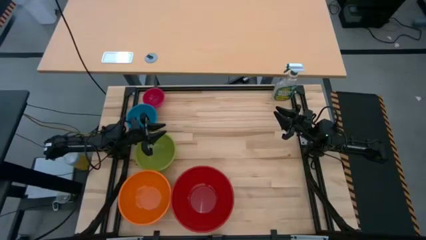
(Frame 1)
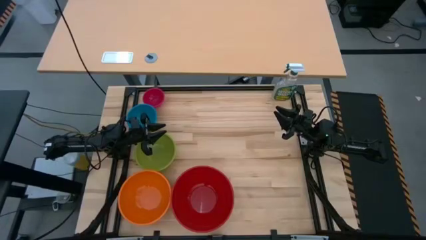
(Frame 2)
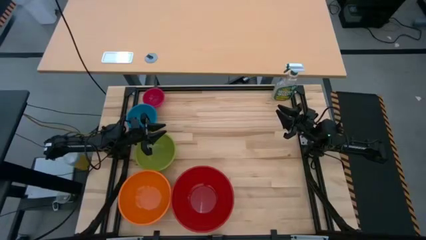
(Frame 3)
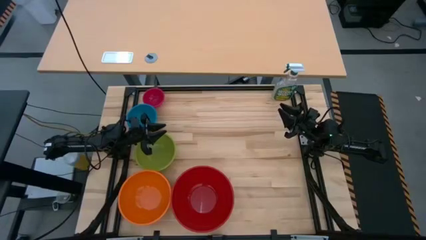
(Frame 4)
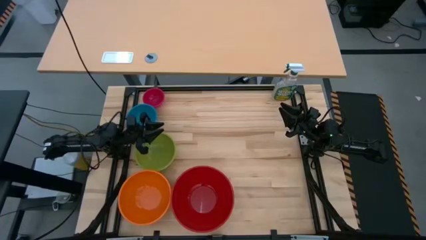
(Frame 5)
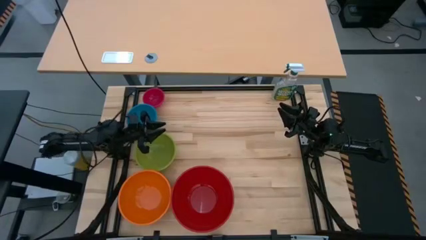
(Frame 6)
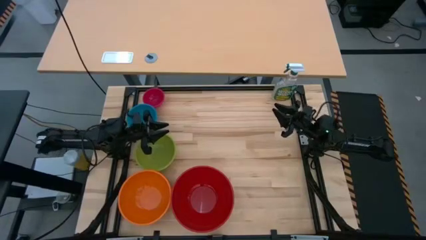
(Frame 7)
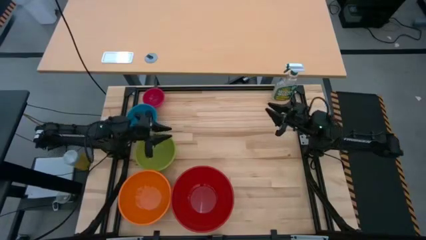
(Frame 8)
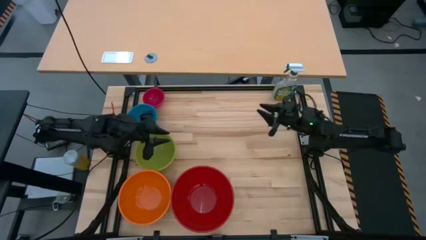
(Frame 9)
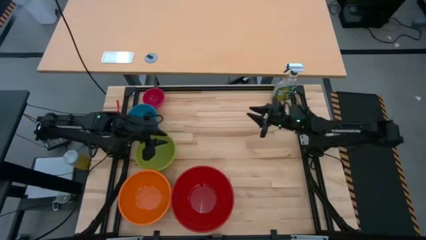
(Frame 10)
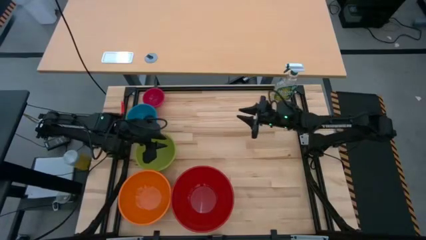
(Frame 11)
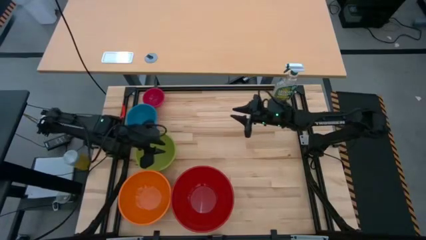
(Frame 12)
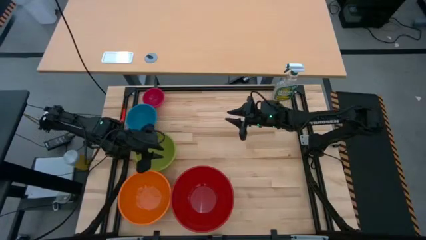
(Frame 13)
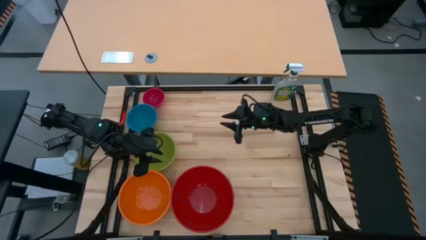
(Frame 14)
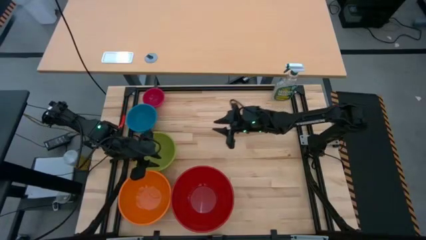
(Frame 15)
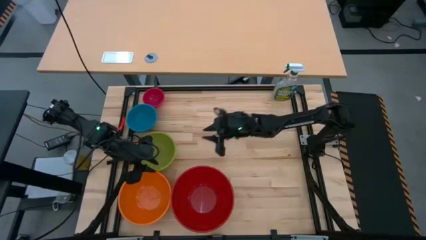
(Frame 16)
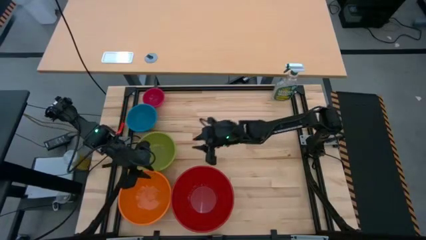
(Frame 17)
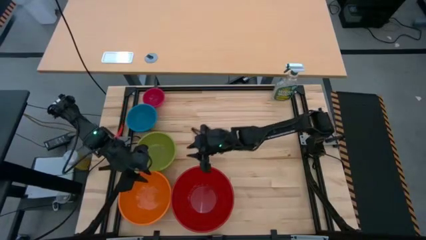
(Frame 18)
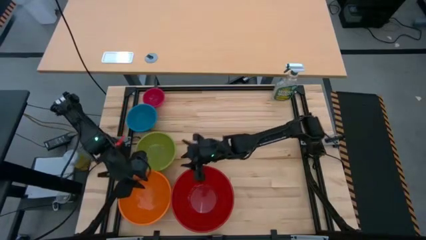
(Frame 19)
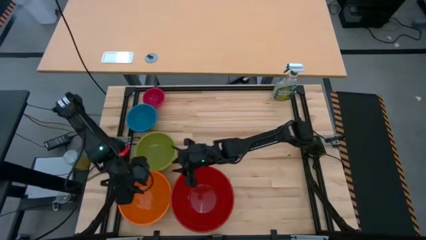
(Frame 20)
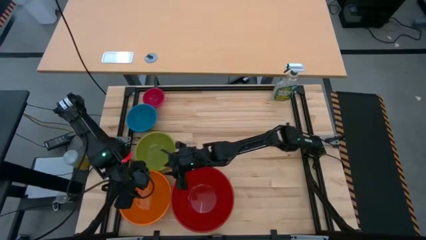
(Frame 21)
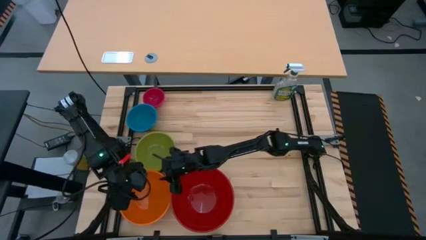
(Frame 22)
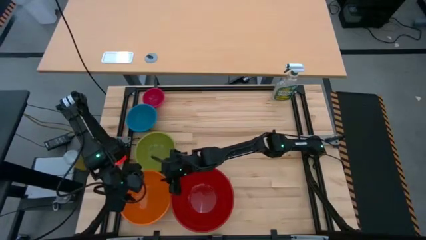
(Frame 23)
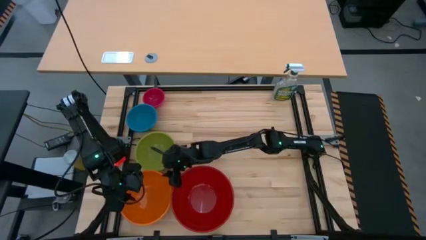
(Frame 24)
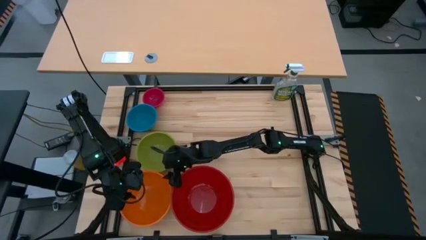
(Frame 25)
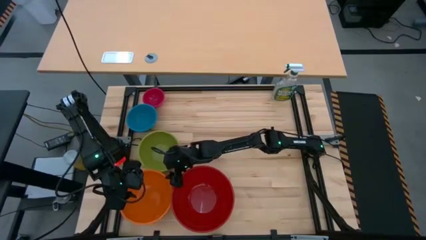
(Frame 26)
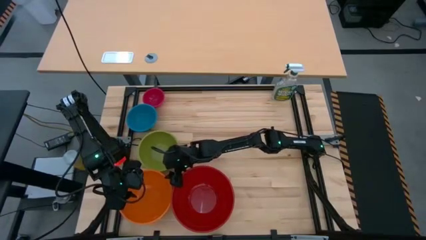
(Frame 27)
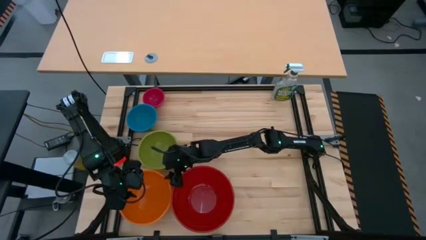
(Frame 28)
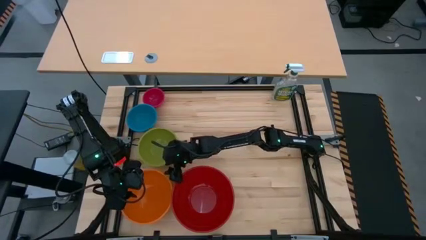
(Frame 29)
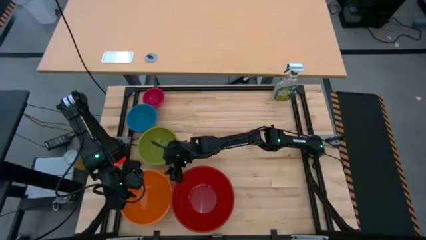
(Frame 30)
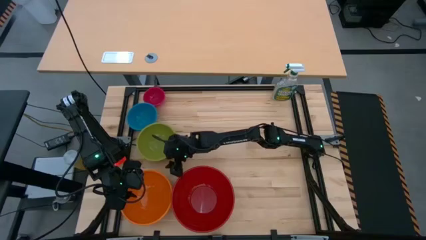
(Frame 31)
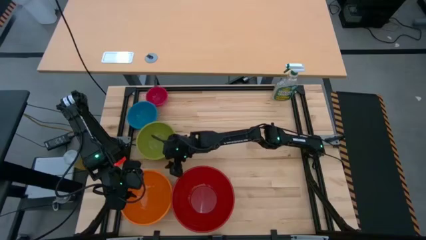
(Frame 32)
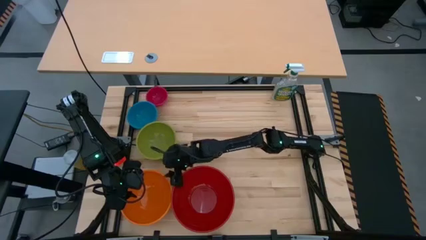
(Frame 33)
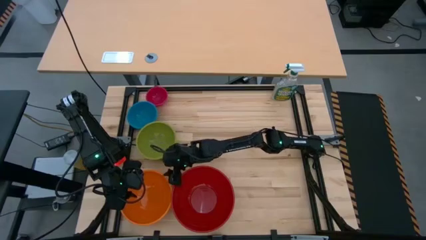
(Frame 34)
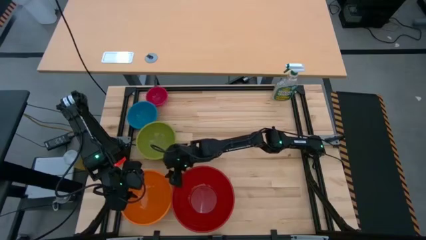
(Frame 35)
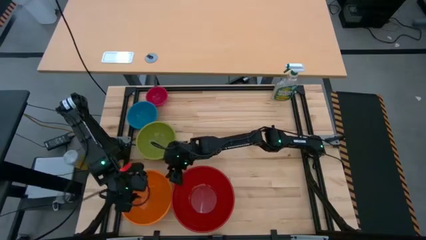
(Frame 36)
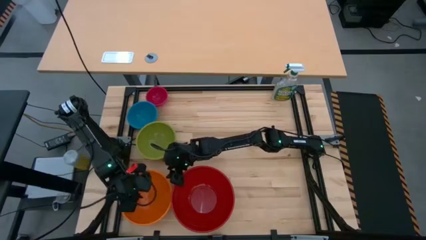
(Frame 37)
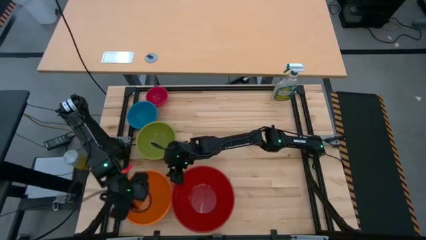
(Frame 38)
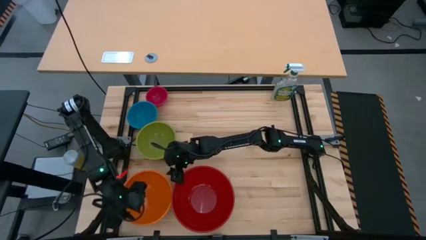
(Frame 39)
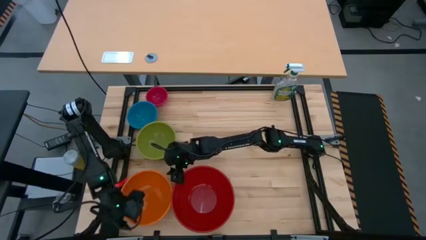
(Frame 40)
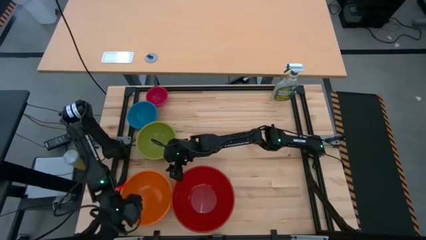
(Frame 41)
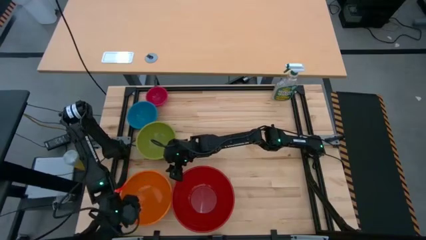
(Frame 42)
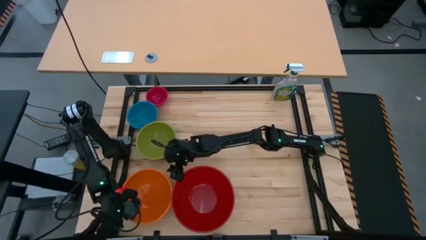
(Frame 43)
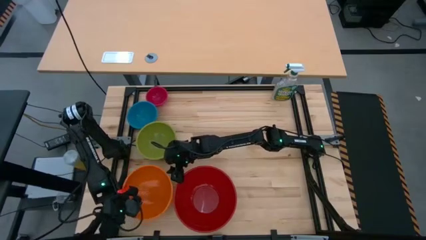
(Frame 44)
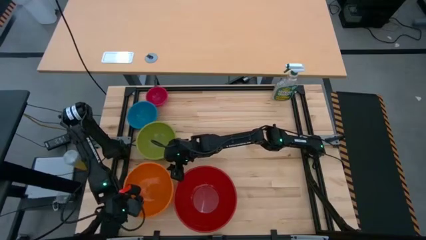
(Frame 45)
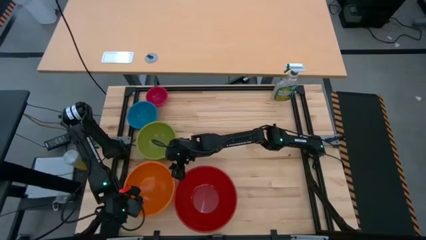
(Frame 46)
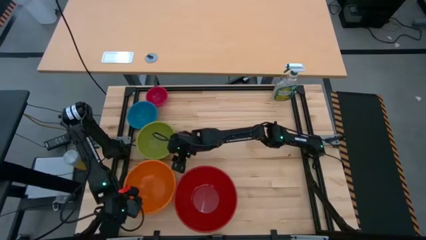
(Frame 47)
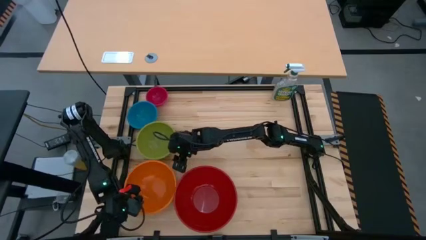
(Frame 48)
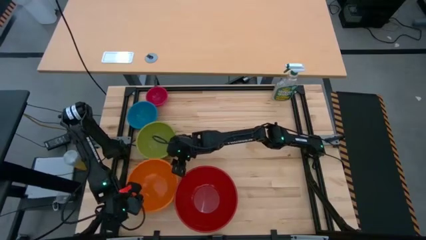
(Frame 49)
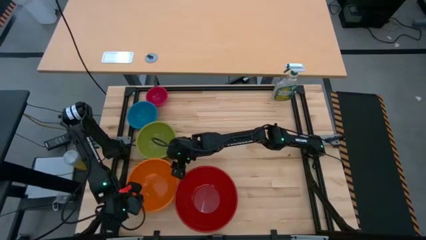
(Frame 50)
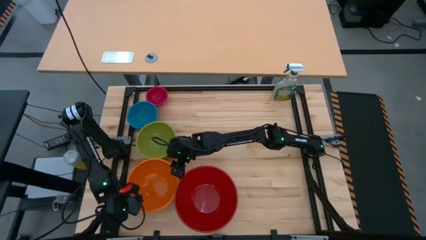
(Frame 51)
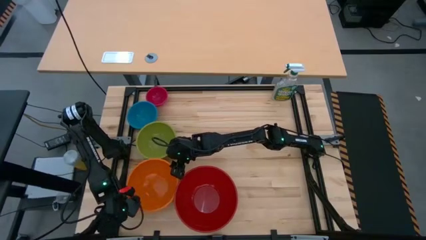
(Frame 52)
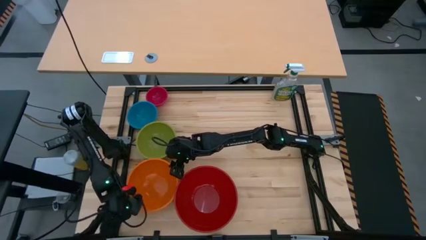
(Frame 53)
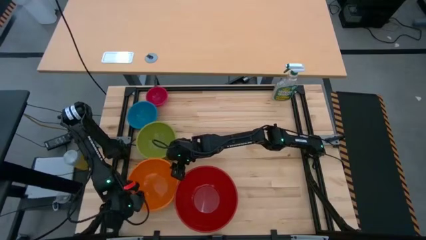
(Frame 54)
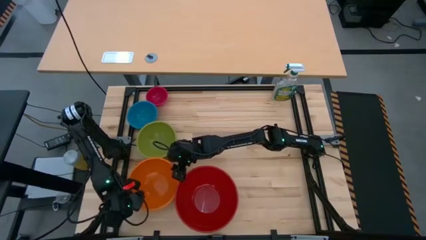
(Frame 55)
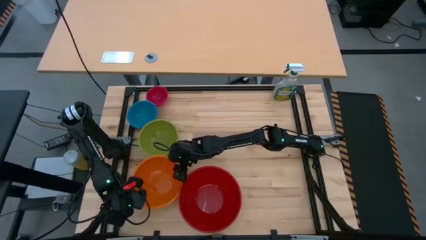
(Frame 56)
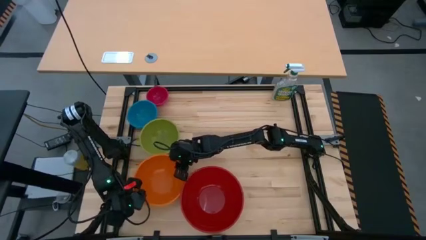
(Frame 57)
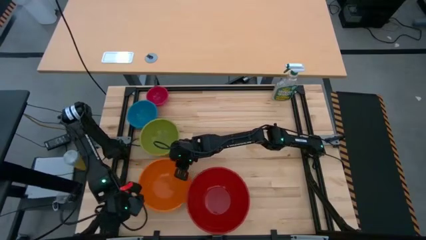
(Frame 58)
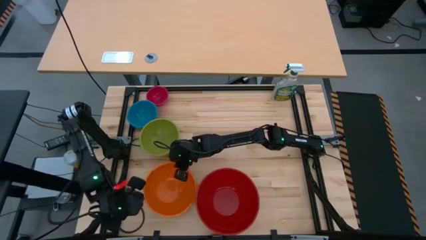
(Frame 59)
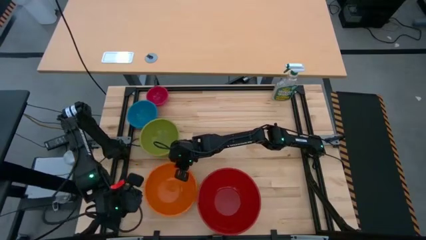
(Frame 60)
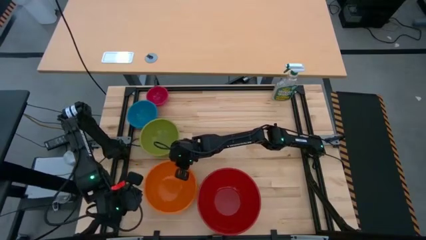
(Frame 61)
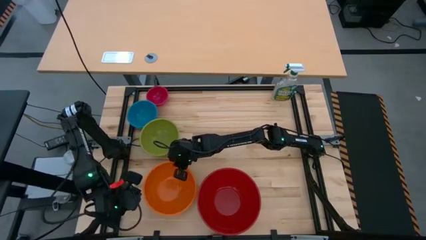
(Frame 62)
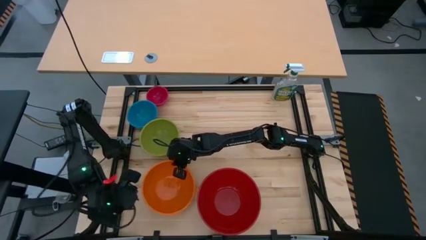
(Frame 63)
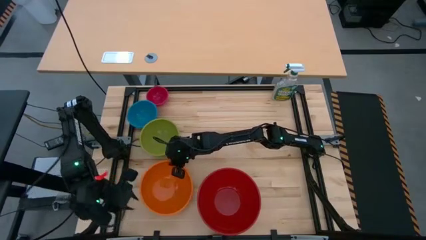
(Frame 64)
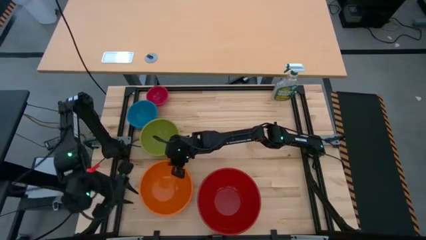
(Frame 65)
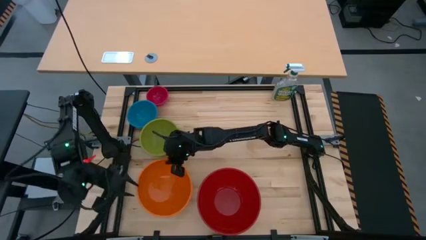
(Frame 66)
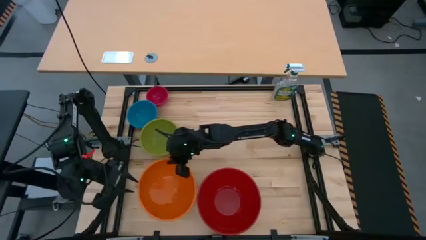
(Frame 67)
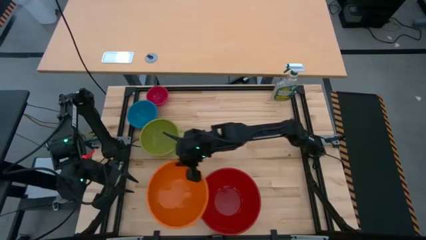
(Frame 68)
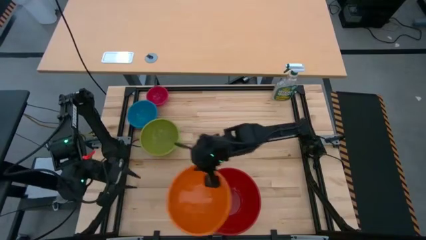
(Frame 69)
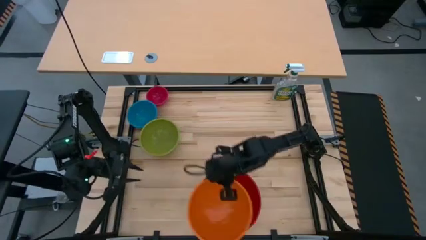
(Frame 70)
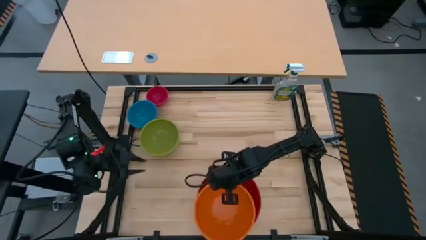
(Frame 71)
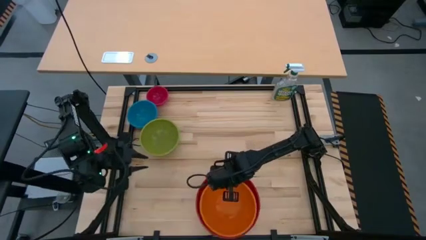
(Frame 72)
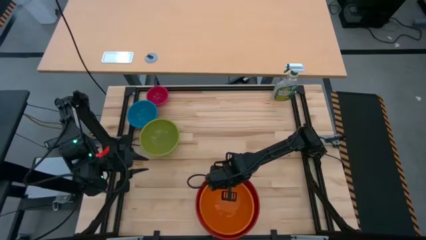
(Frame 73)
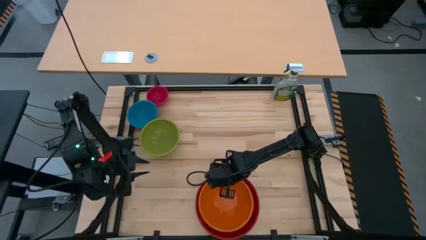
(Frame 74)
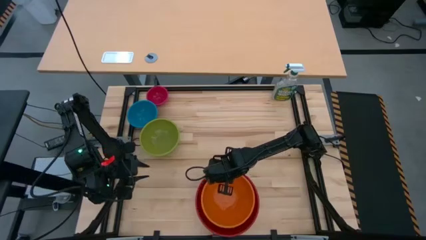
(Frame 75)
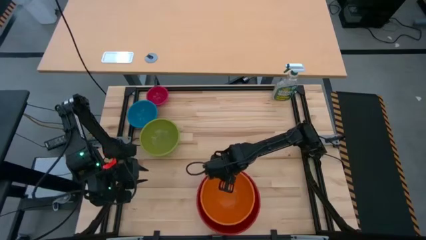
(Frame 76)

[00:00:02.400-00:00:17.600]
Stack the orange bowl on the red bowl
